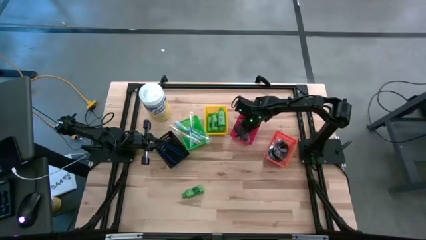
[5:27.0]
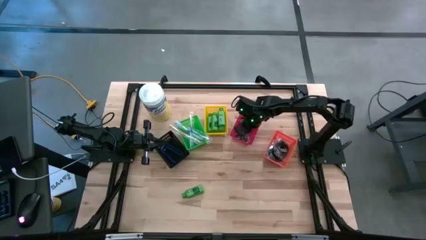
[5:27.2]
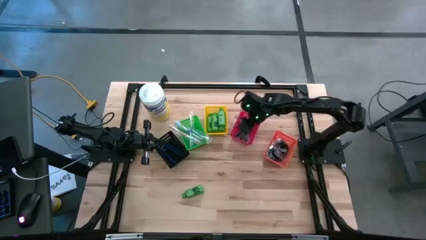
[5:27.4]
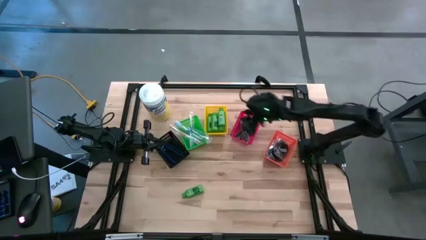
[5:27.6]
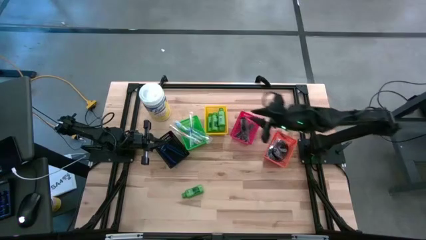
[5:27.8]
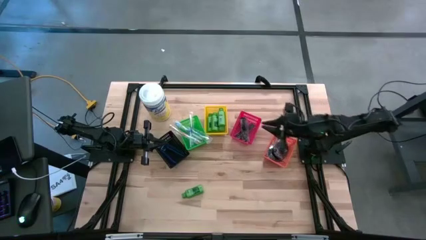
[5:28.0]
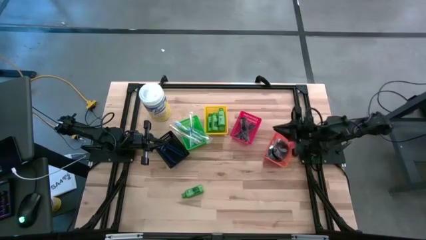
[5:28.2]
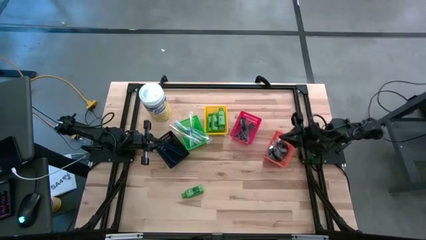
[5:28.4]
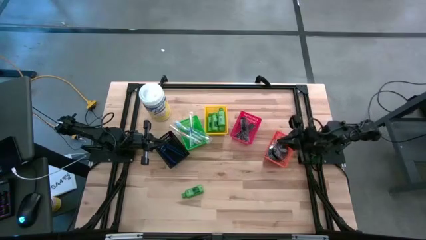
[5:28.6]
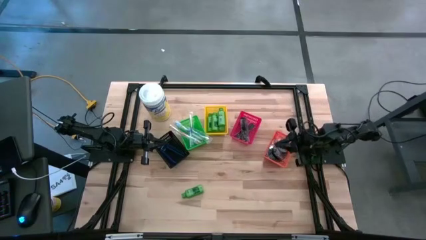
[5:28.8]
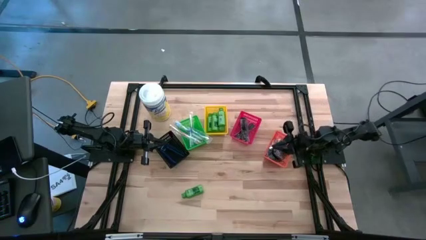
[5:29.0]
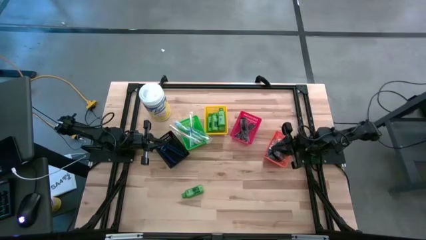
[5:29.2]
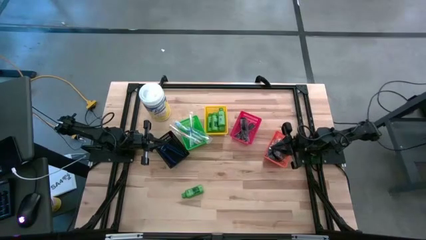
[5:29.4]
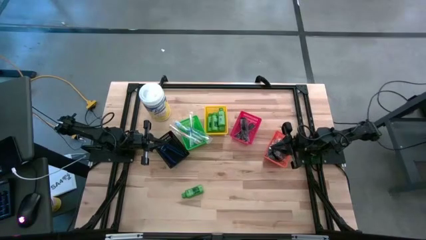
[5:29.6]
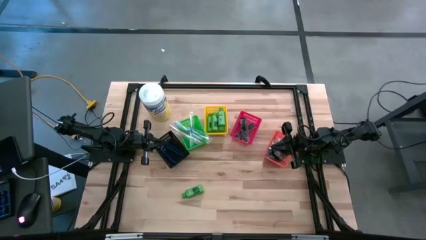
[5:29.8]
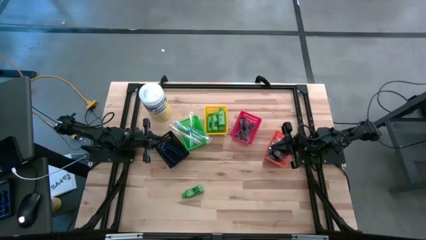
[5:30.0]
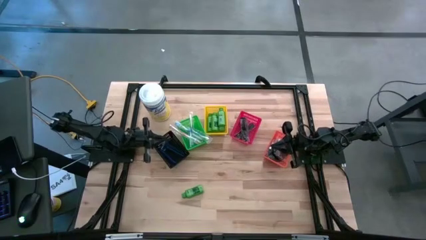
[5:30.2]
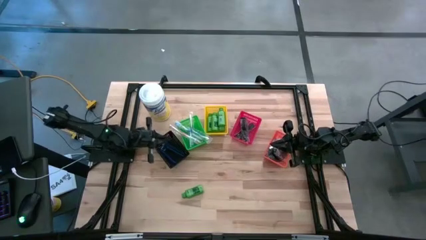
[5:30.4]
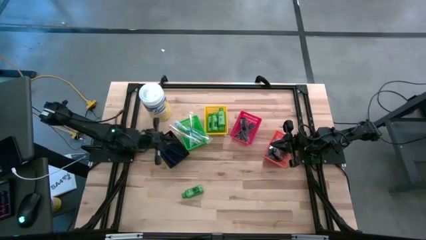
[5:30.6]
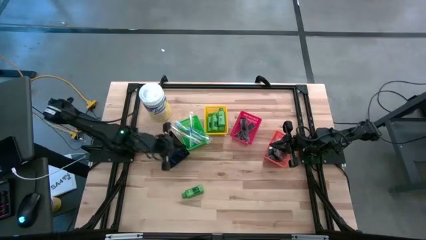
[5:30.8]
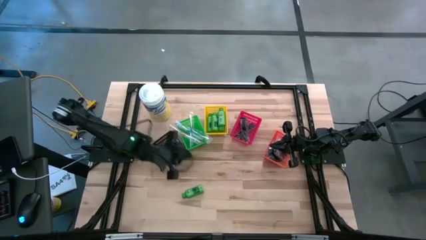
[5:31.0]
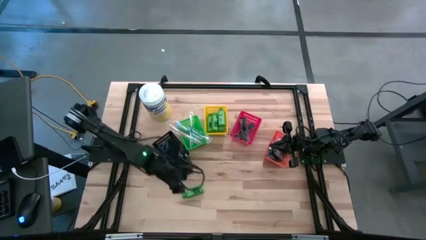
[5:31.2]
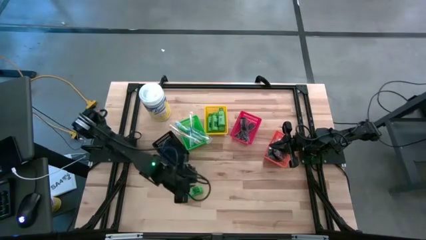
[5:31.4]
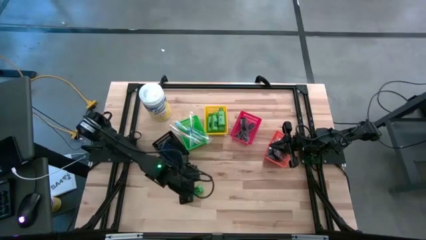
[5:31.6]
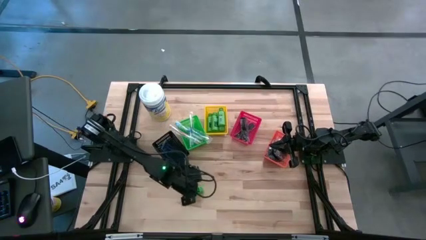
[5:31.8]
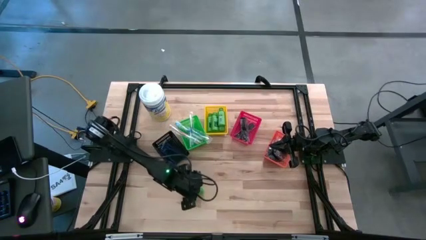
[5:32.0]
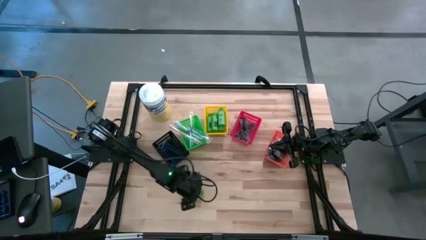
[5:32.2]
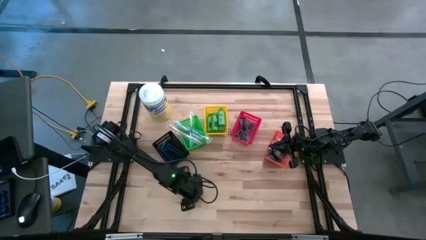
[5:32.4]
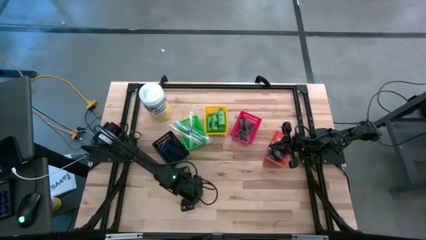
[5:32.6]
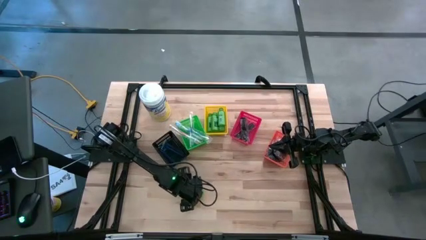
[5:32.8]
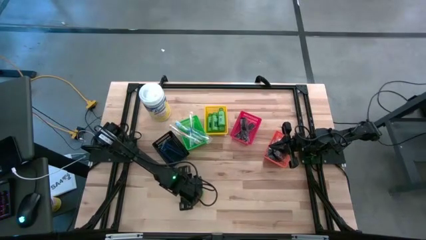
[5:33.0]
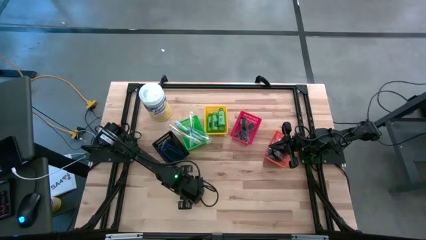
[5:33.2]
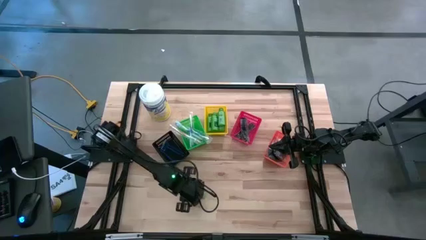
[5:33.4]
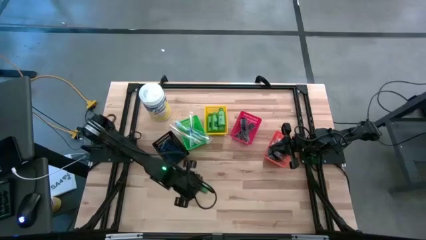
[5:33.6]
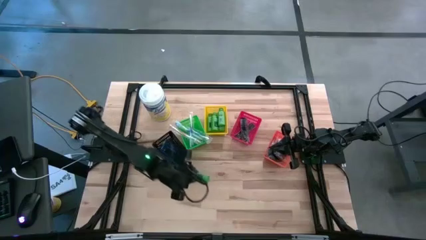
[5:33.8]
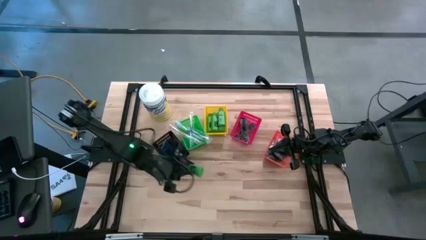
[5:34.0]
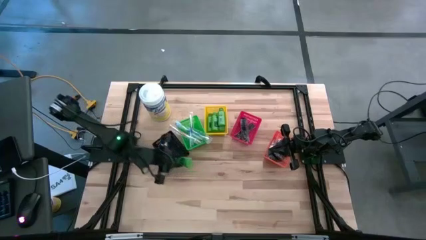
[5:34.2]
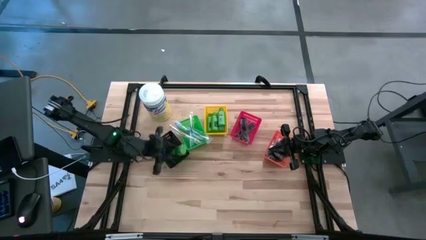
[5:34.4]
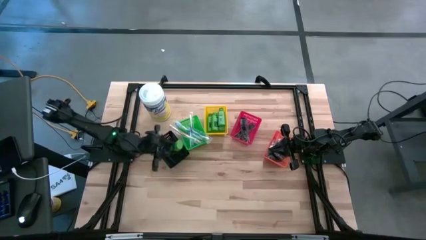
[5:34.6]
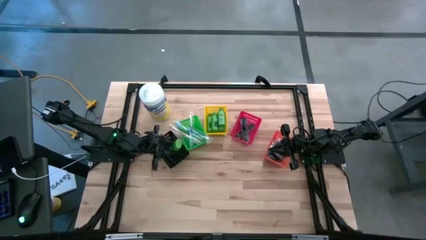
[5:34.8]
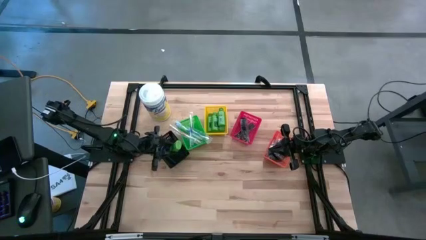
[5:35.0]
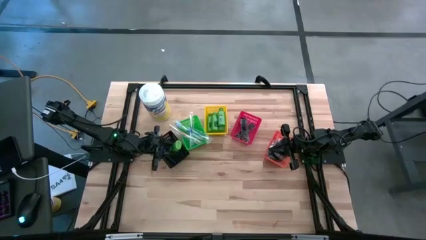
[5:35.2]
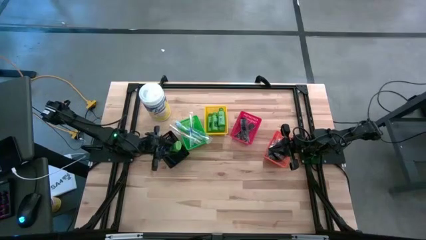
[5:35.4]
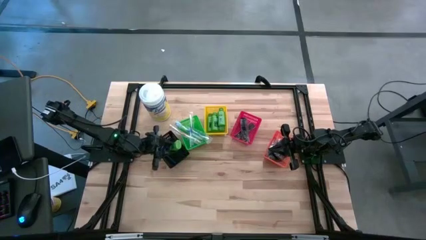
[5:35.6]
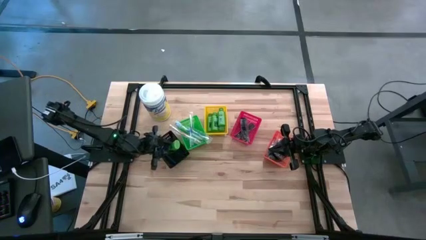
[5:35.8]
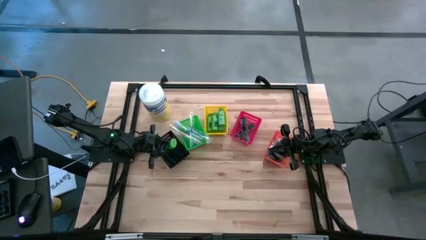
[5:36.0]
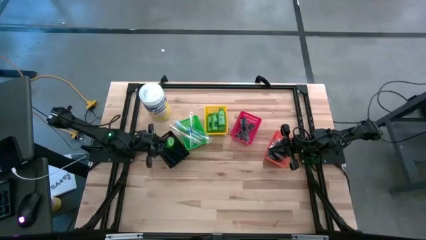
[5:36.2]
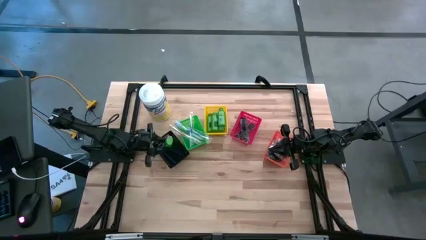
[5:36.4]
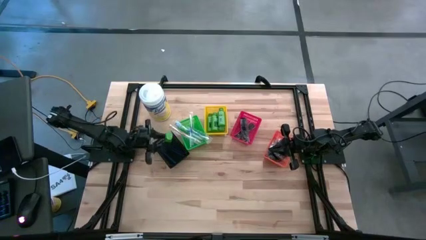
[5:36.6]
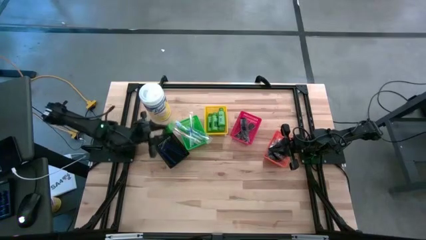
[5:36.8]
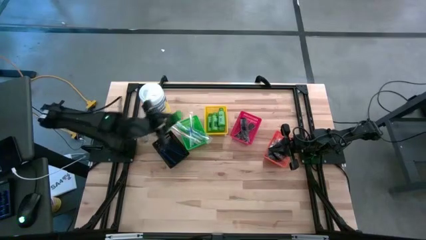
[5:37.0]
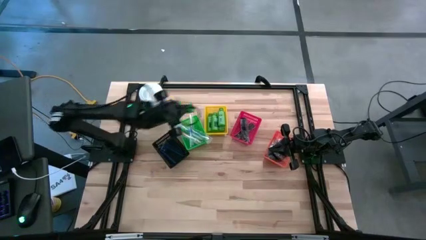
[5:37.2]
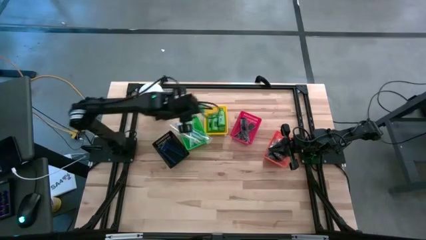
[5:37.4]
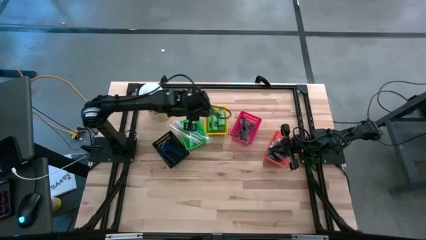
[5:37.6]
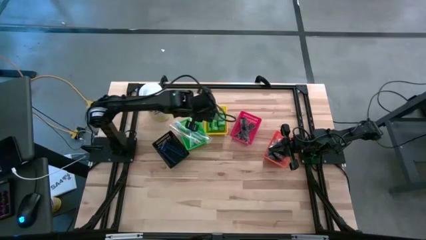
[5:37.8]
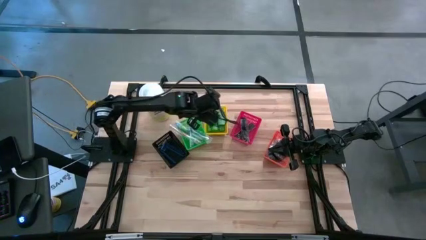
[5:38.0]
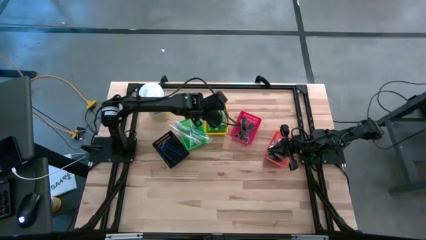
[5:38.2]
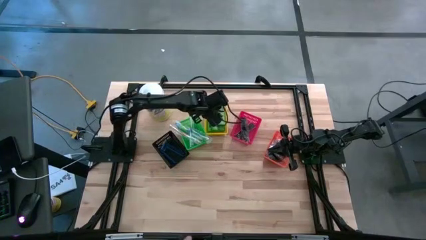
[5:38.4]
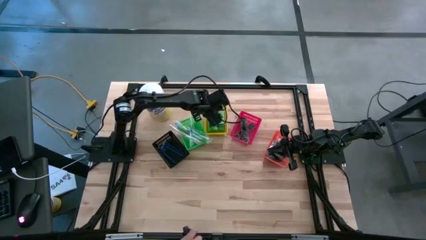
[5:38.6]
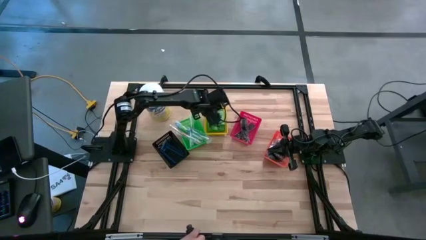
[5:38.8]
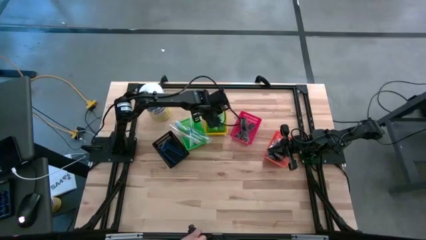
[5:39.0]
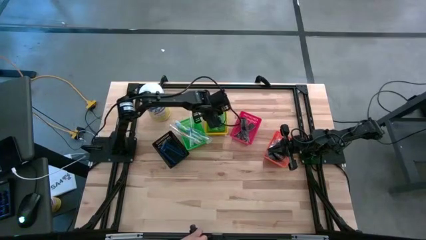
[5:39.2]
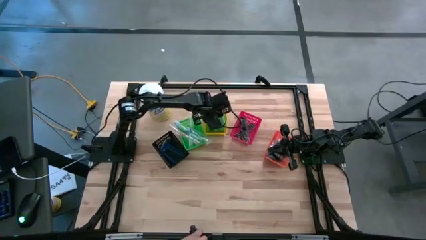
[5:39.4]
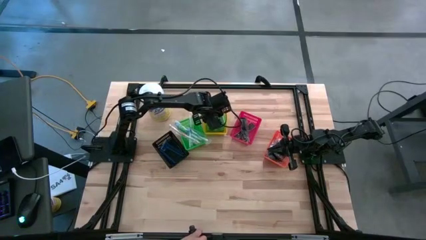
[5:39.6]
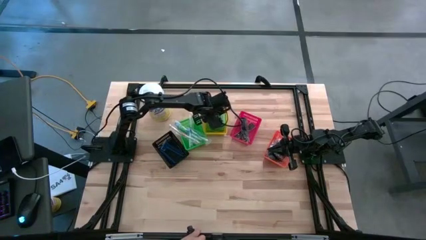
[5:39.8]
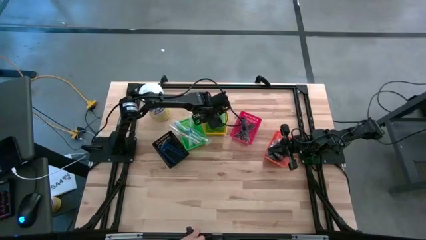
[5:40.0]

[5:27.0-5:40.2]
Task: Pick & Place Travel size toiletries
Put the green shampoo bottle into the yellow bin
